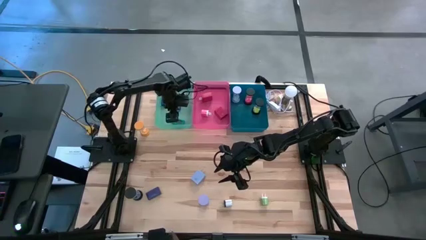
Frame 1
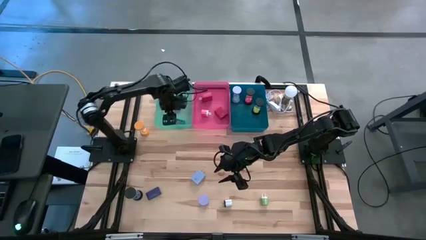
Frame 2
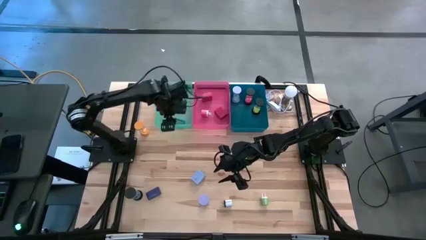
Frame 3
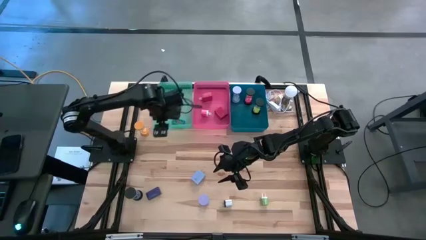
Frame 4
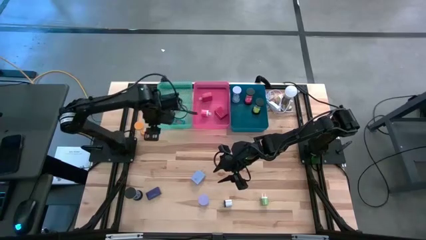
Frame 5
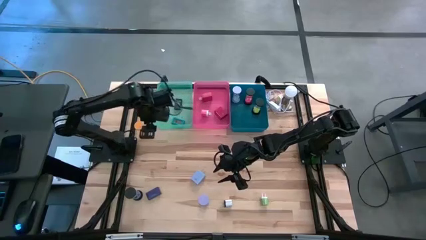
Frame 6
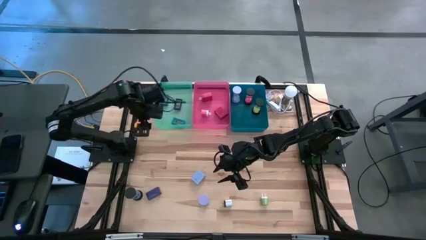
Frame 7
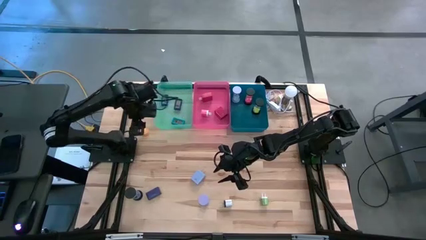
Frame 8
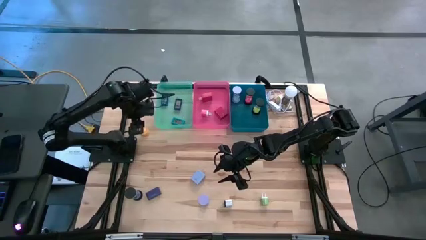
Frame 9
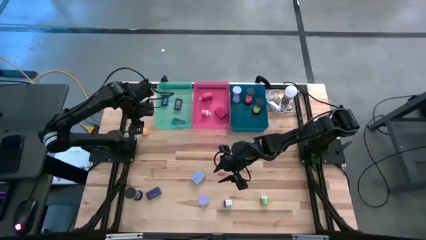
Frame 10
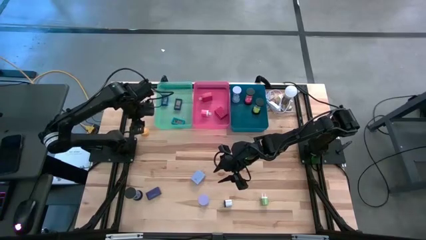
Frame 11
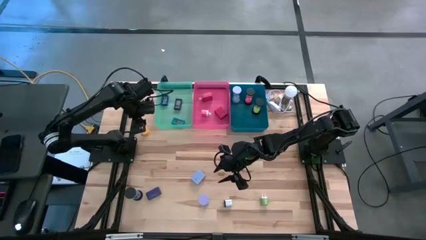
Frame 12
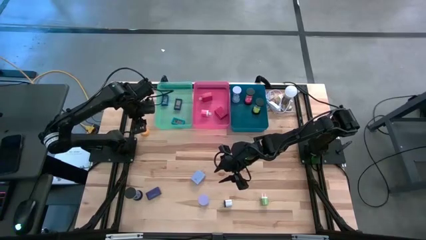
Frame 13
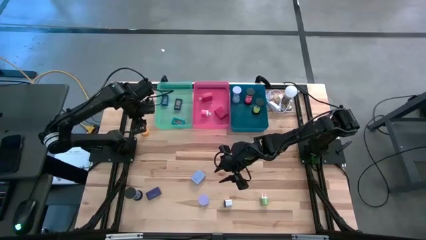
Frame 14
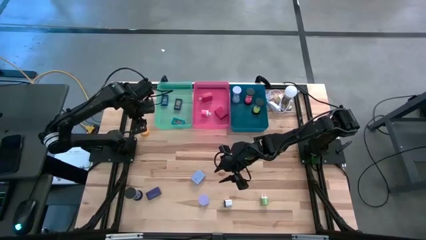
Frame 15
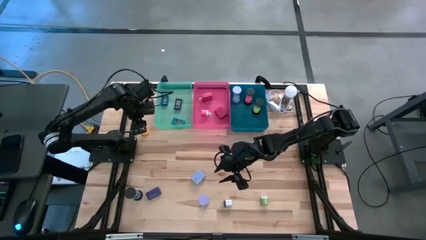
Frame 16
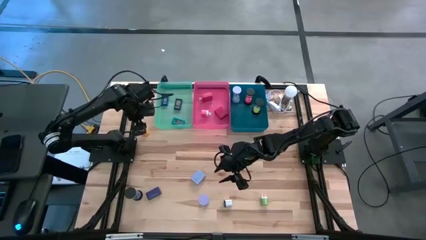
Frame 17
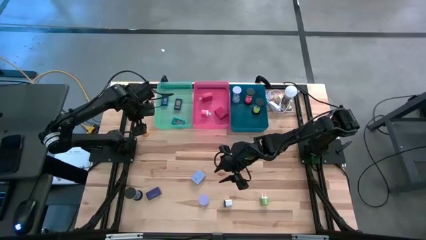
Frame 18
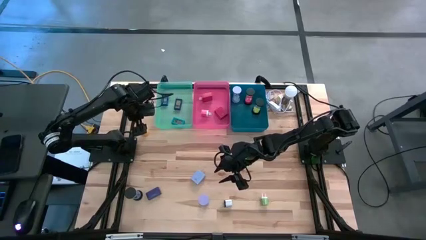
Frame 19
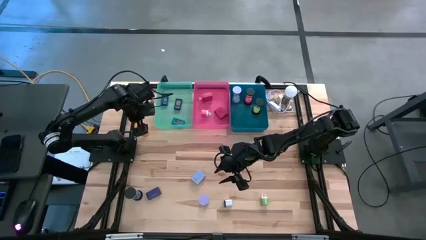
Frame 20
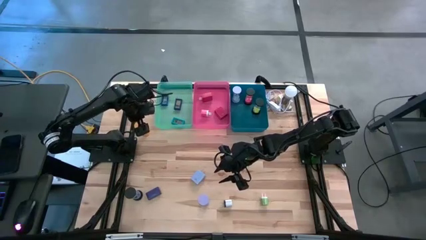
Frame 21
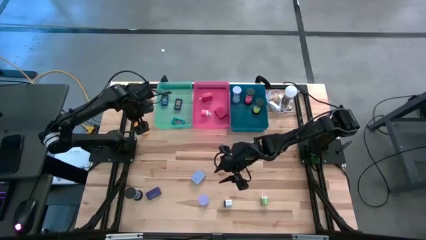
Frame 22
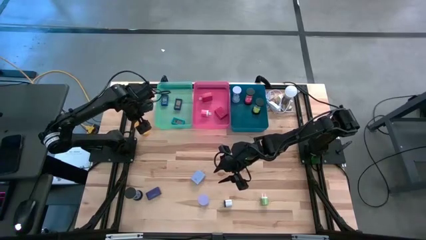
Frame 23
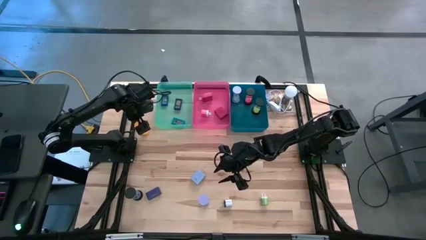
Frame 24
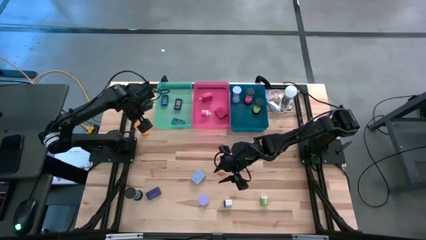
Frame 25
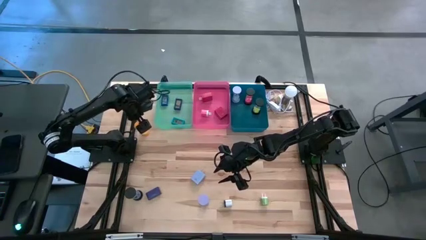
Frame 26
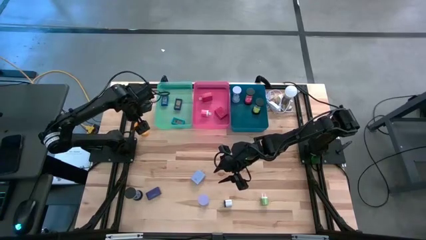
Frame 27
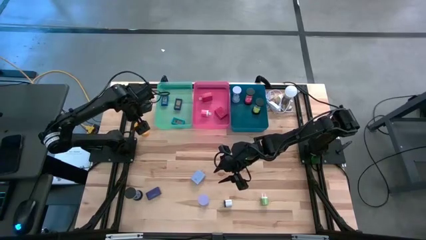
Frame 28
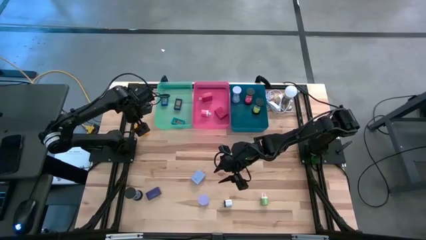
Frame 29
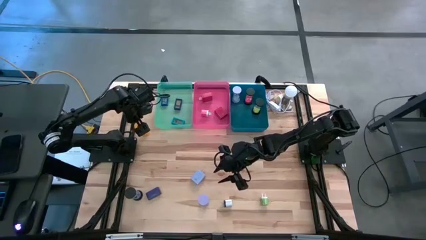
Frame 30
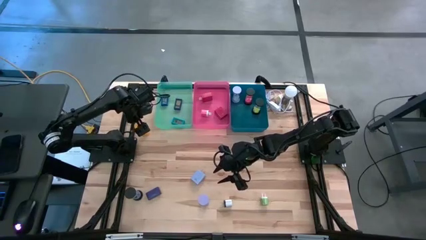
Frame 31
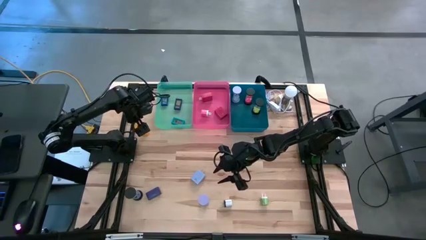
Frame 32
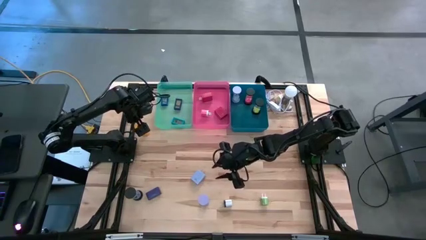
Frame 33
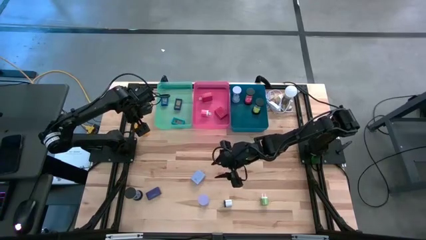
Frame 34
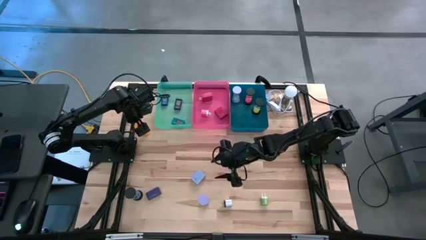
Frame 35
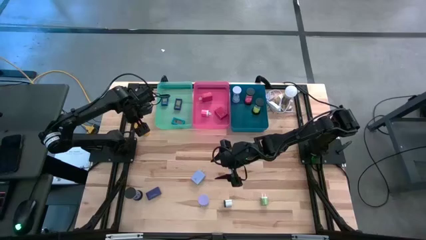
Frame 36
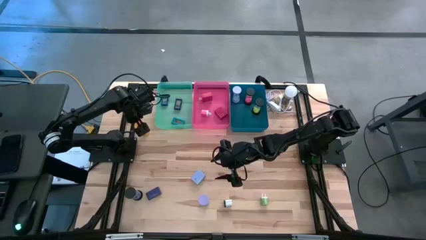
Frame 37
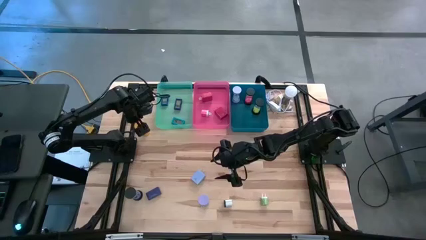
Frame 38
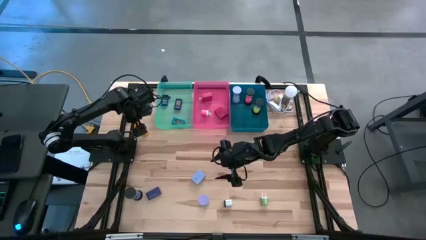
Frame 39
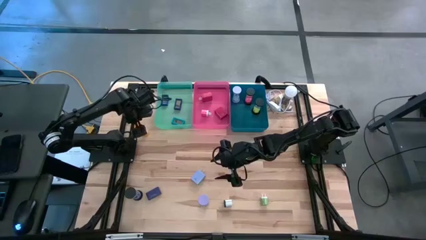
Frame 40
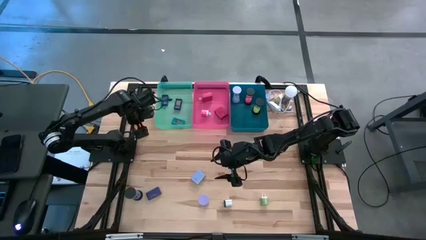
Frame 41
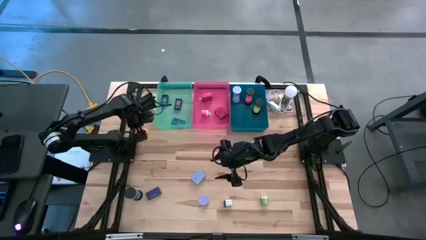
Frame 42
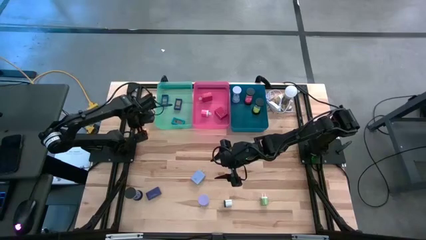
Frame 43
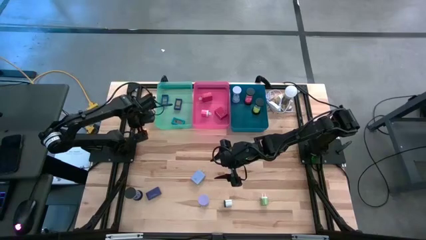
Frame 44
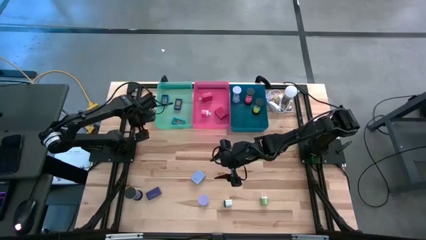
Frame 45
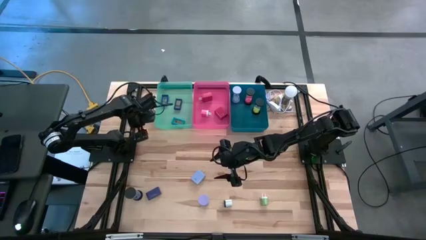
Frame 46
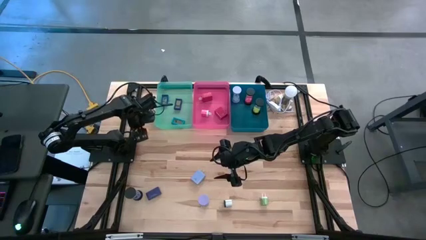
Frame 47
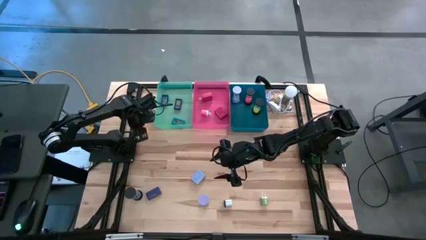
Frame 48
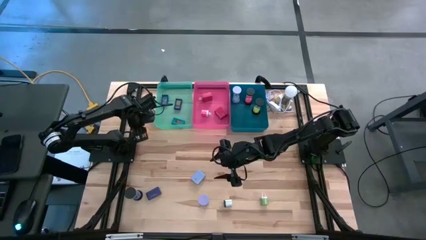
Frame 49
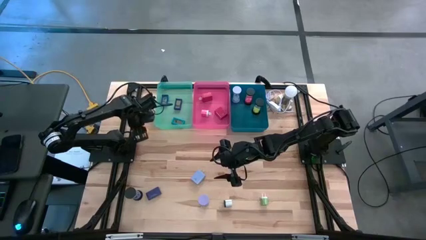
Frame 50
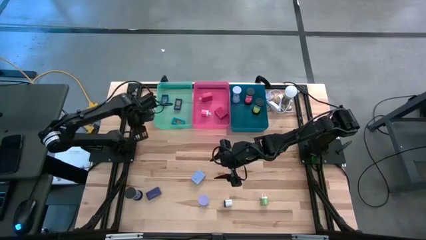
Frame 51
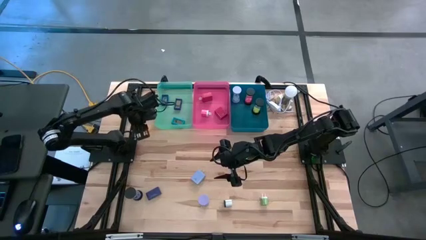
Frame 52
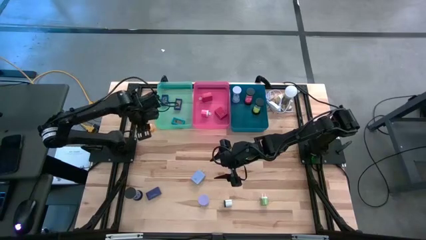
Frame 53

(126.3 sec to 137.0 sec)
Task: Pick & Place Office items
Put the yellow hourglass into the dark blue bin

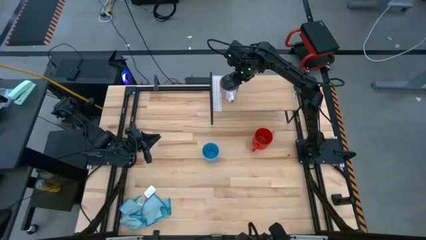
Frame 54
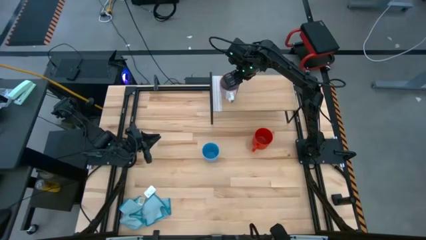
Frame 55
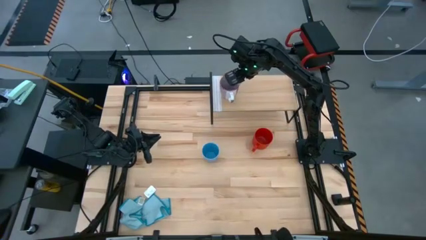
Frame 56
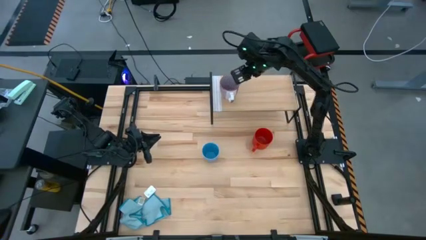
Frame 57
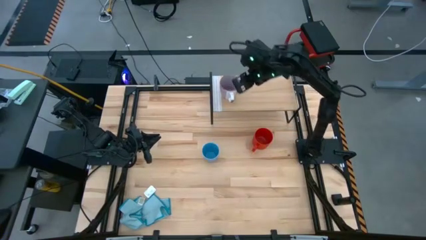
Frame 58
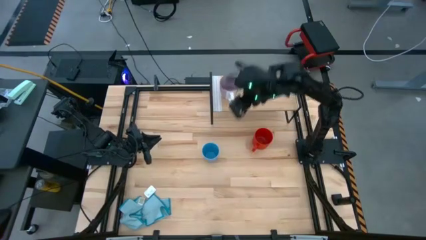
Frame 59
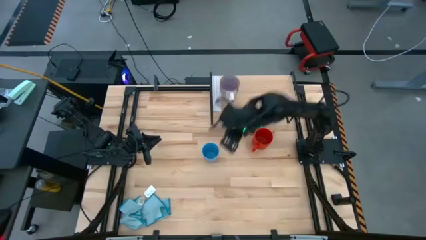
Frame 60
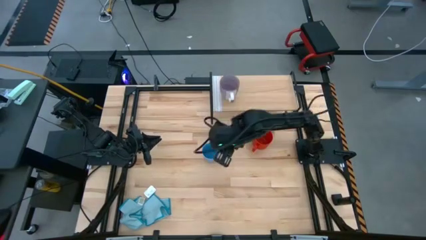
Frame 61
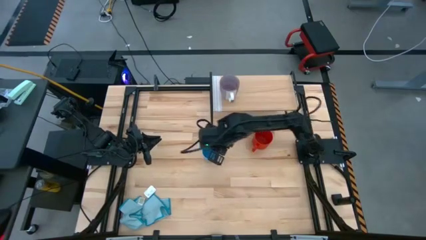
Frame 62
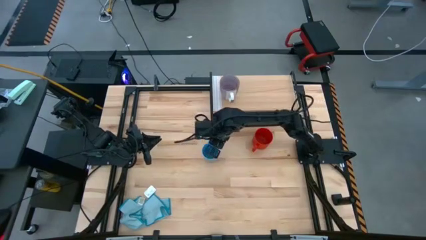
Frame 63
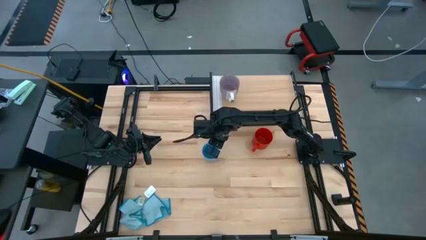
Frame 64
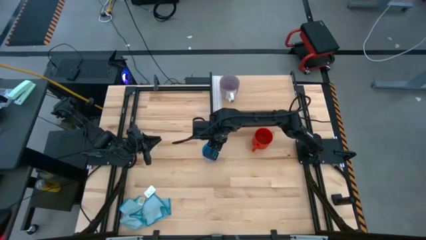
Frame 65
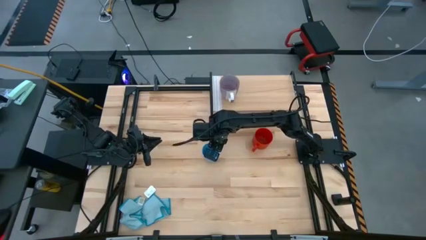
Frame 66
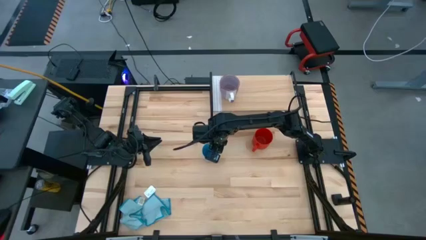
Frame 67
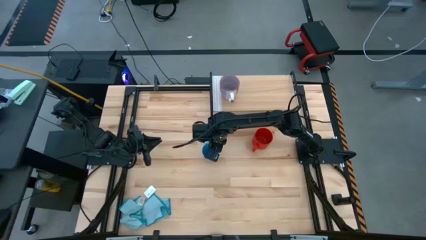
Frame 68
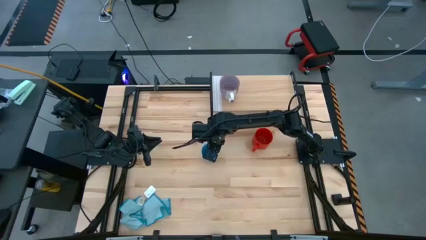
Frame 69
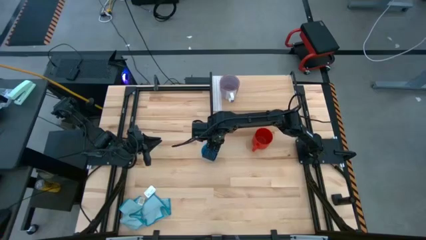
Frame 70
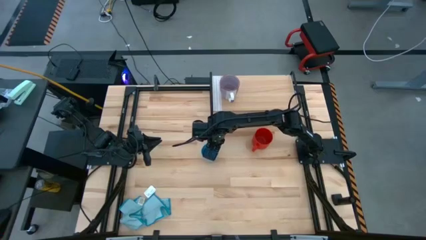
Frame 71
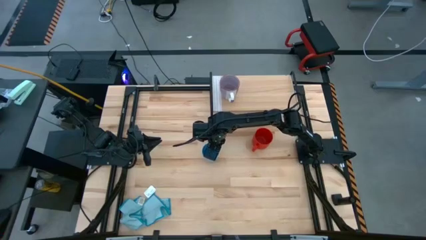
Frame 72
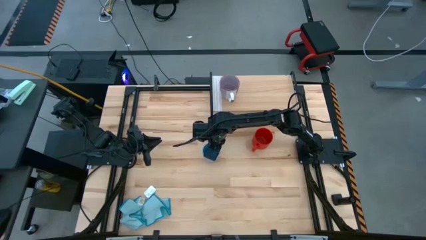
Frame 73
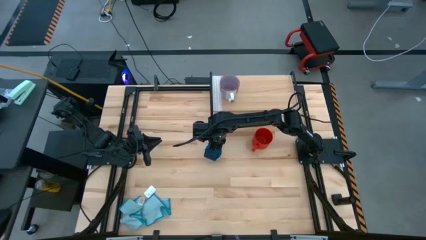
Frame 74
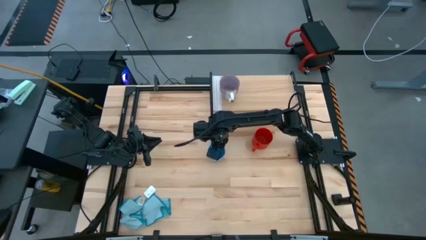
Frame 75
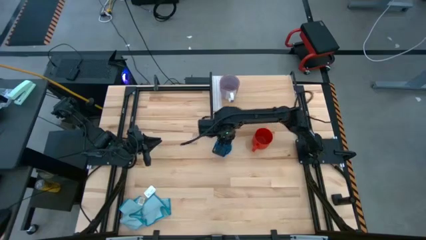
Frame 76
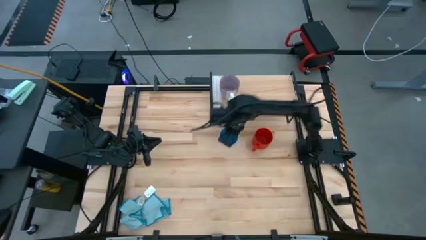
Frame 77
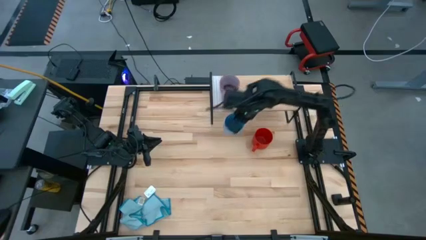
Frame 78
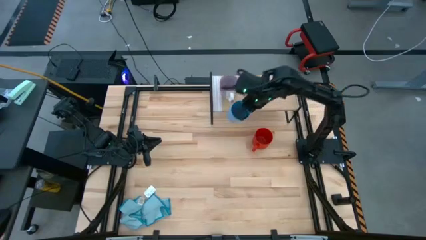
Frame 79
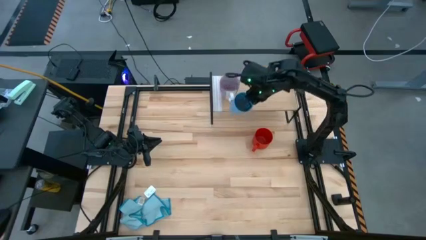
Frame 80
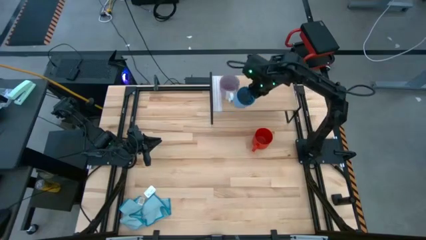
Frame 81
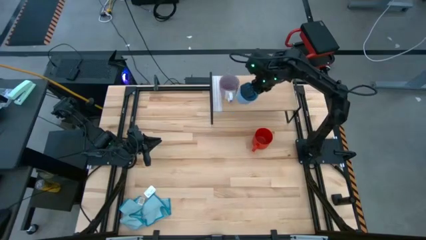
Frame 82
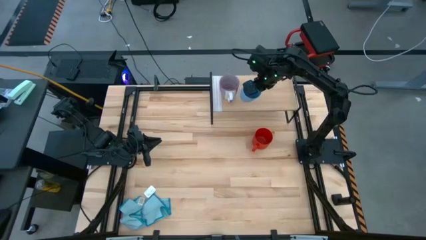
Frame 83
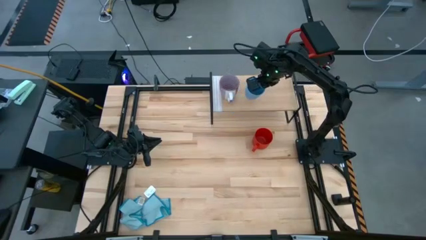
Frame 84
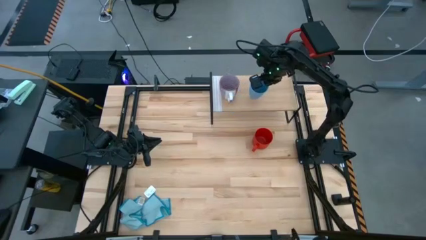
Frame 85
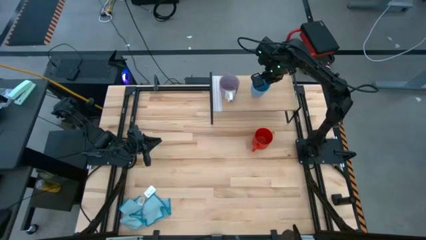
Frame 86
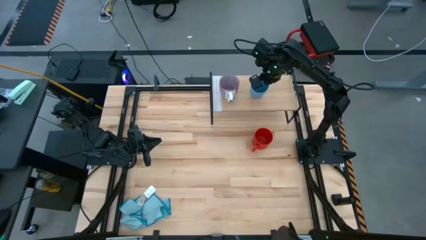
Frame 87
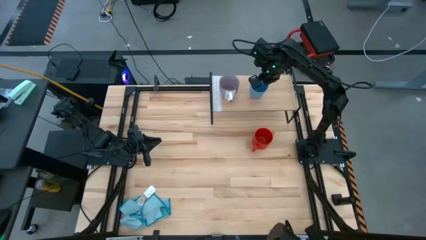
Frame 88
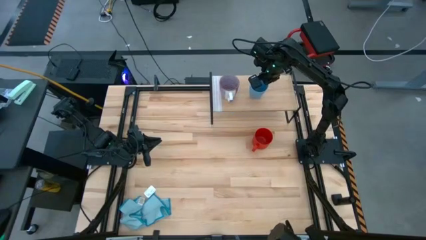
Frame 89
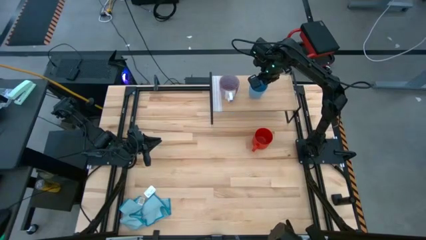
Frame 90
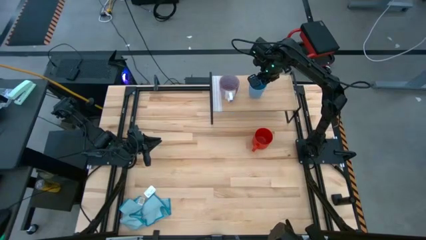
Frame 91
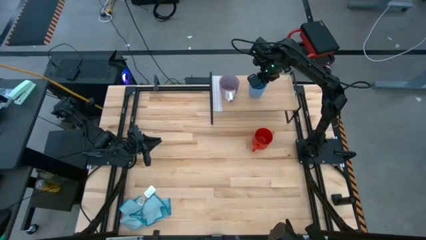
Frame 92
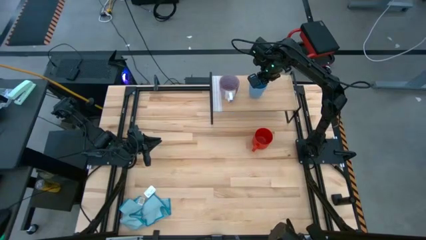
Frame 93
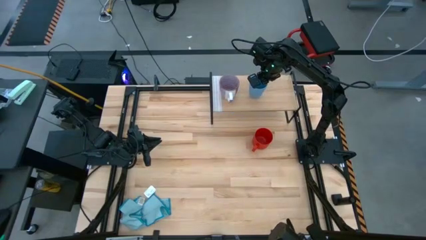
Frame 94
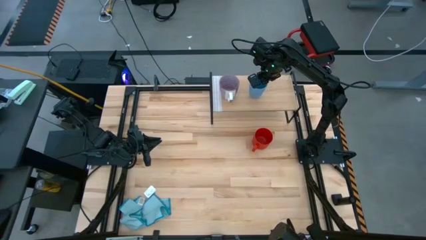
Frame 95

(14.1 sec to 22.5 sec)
Task: Stack small to large cups/mugs on shelf
Put the blue mug on the shelf
